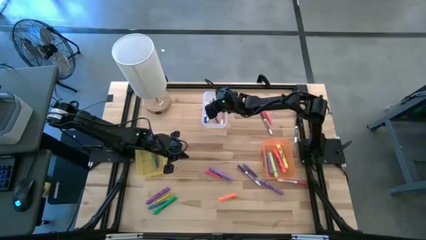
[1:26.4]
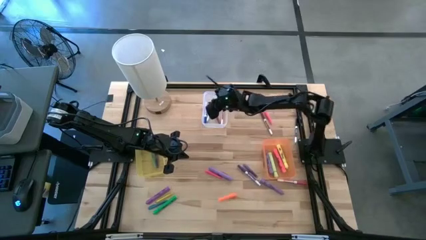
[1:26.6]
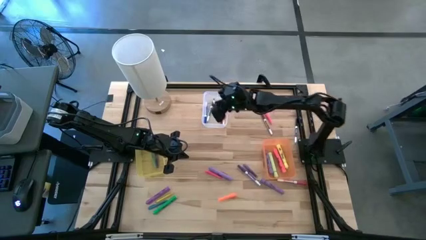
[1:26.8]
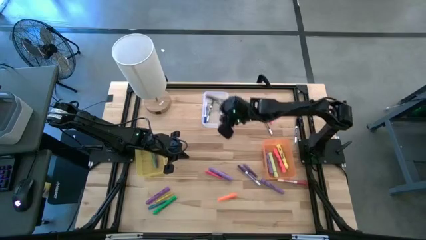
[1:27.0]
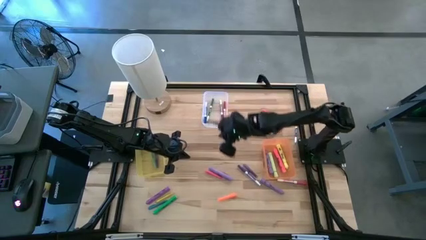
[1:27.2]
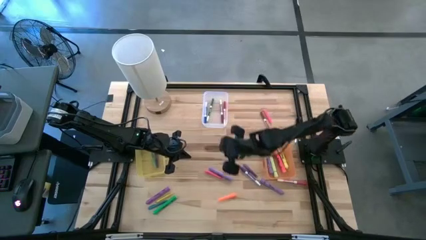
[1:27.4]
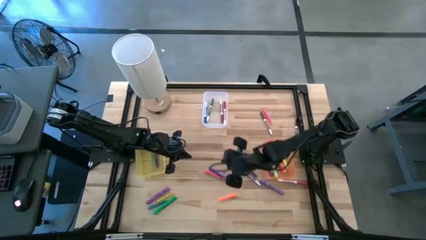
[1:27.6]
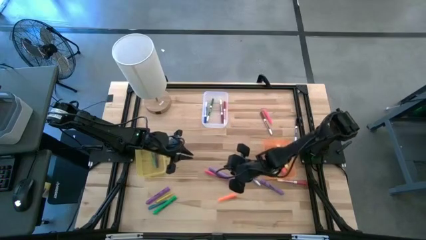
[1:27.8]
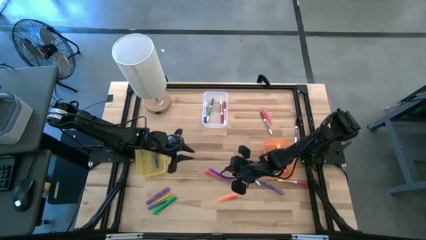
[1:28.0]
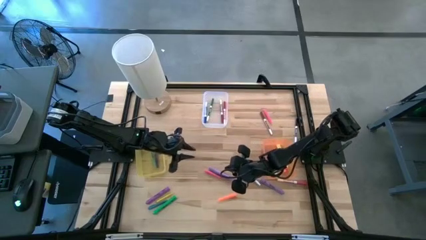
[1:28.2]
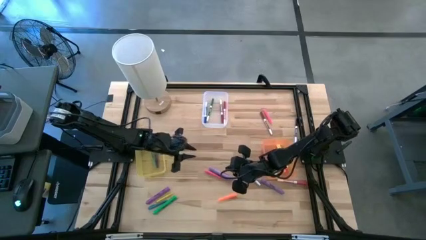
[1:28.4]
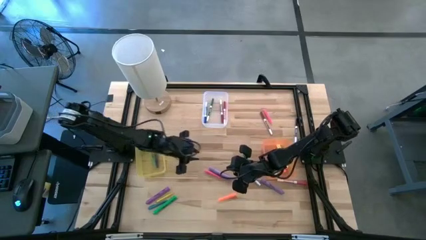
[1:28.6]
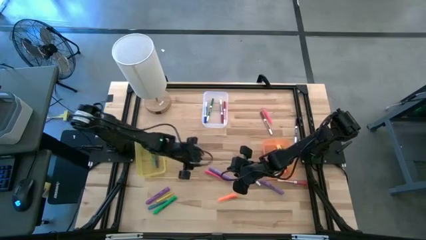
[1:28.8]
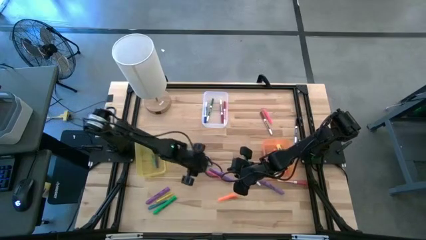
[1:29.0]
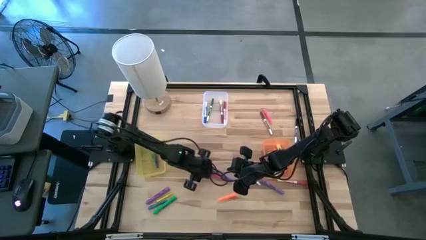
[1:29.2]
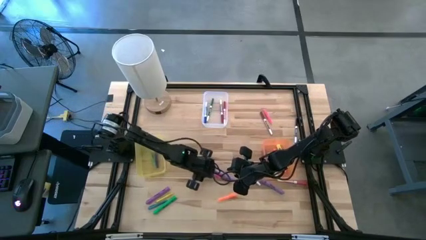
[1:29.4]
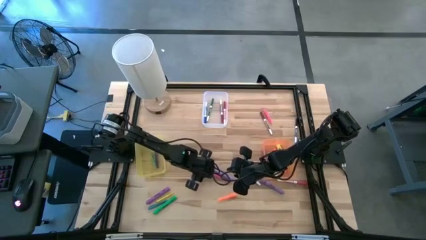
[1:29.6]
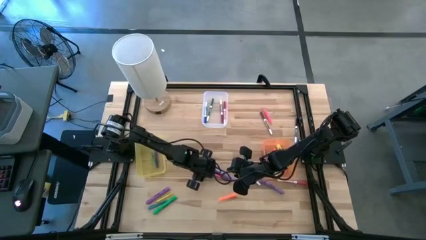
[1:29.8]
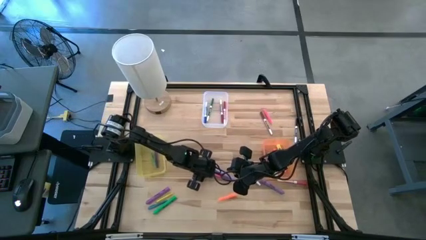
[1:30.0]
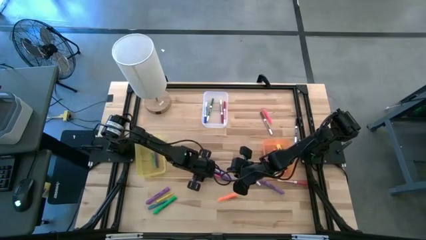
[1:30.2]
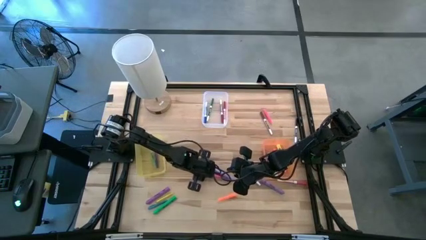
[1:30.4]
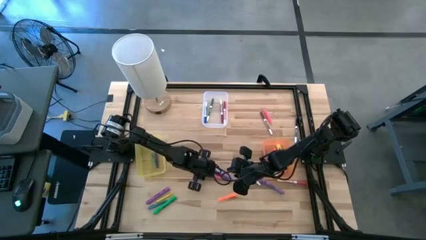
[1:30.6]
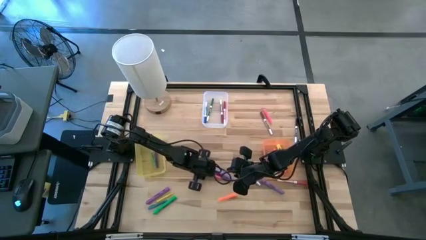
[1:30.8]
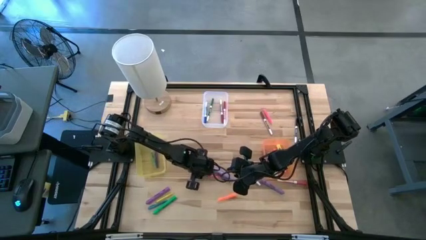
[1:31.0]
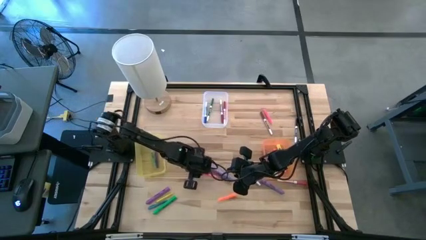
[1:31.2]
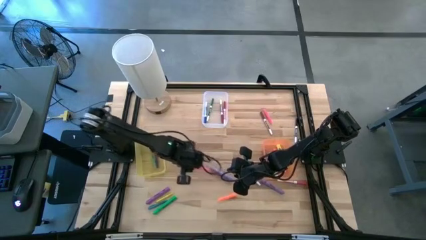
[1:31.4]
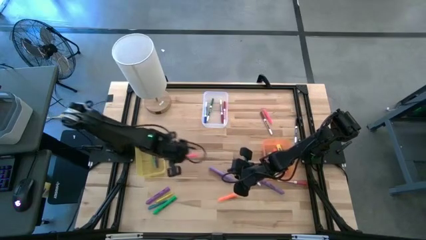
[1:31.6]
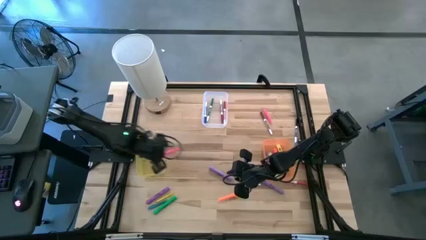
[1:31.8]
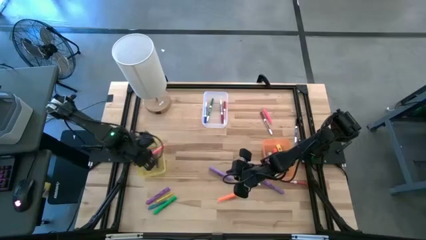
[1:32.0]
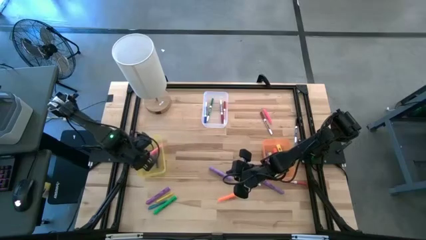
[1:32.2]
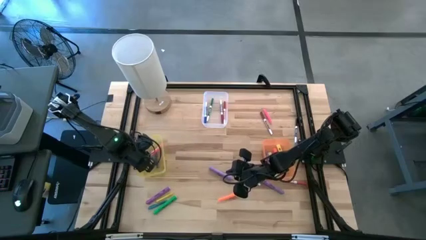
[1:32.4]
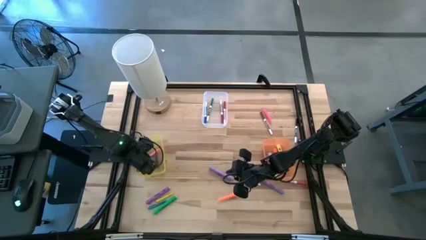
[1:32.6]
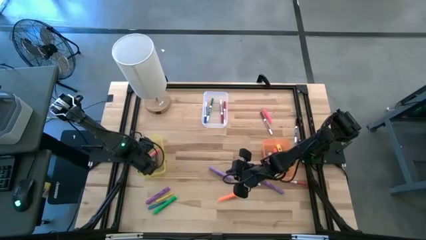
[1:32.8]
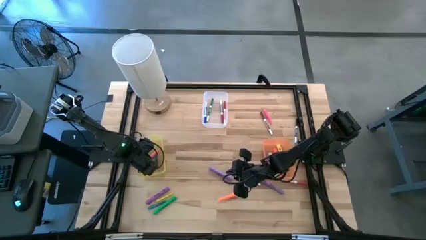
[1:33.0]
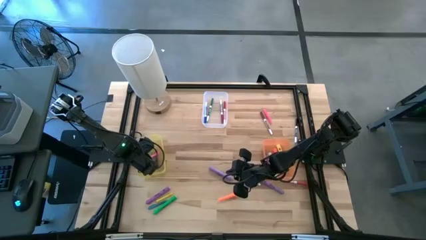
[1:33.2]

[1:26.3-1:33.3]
Task: Pick & Place Markers
Put the pink pen into the yellow bin

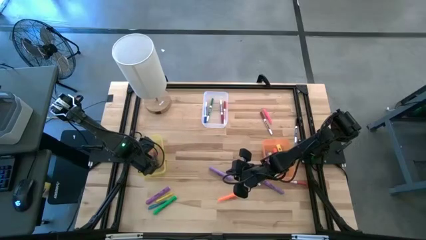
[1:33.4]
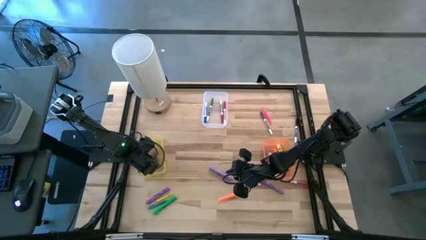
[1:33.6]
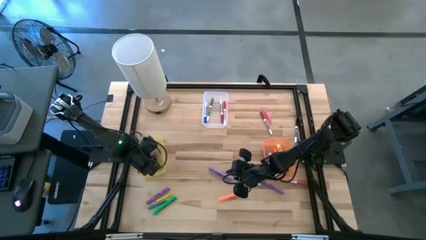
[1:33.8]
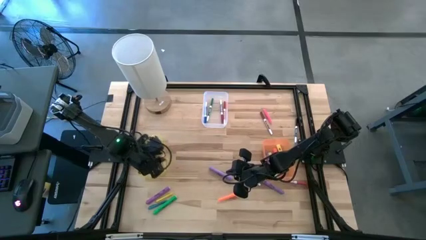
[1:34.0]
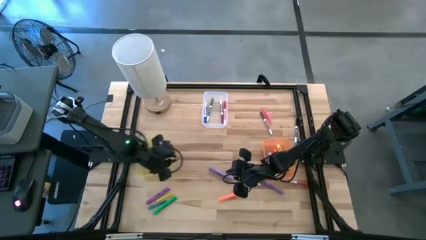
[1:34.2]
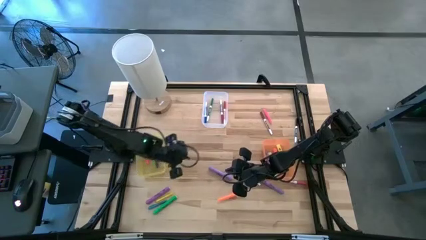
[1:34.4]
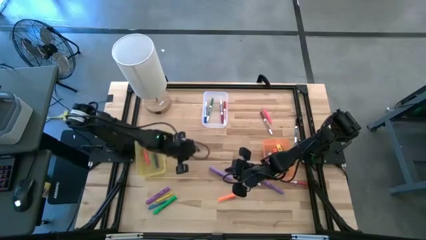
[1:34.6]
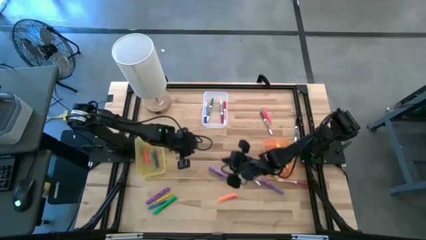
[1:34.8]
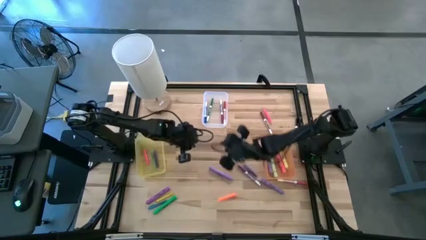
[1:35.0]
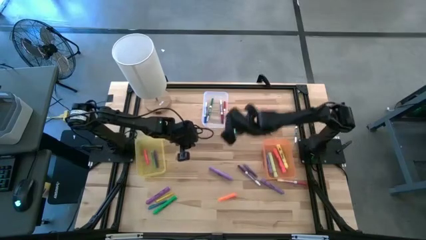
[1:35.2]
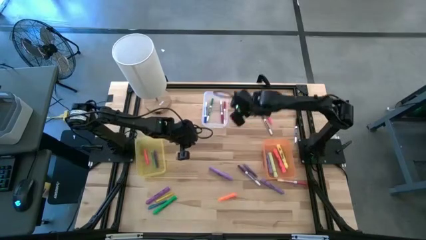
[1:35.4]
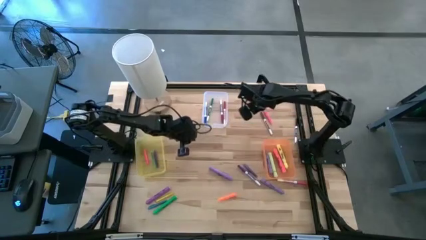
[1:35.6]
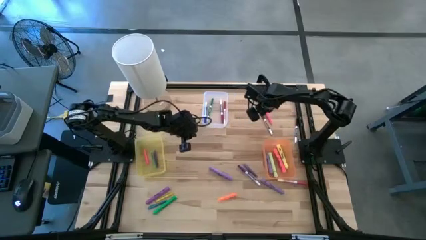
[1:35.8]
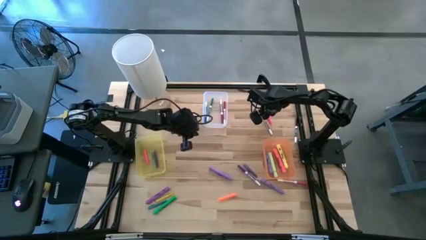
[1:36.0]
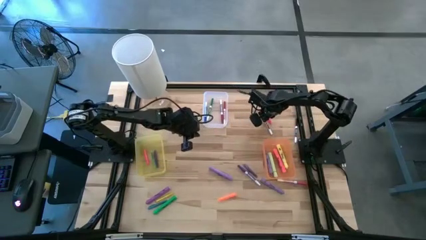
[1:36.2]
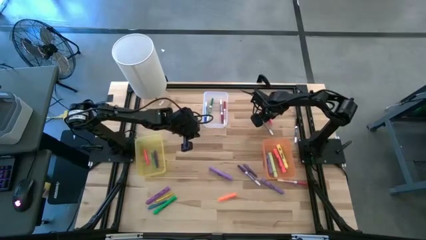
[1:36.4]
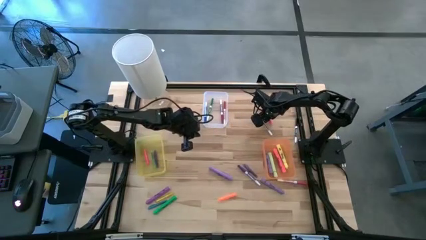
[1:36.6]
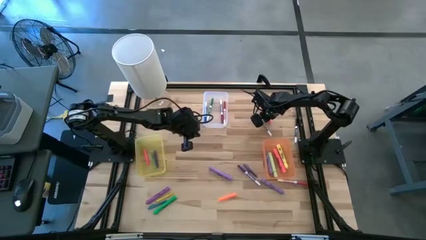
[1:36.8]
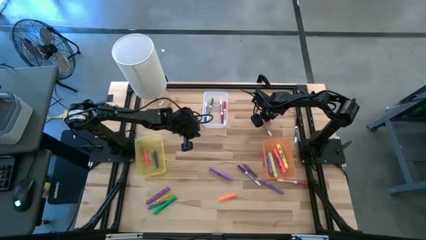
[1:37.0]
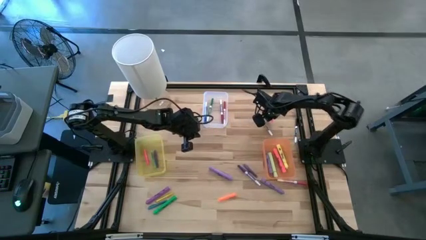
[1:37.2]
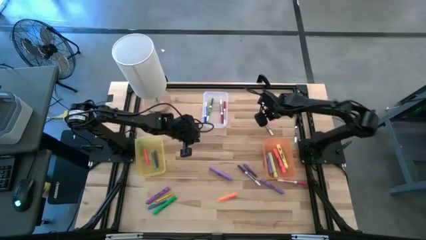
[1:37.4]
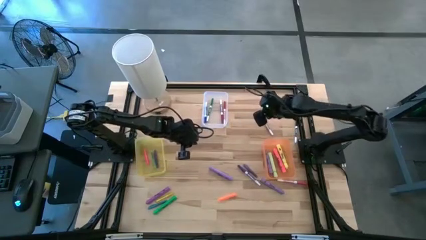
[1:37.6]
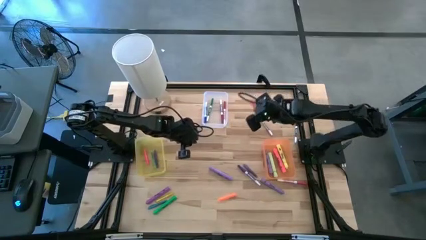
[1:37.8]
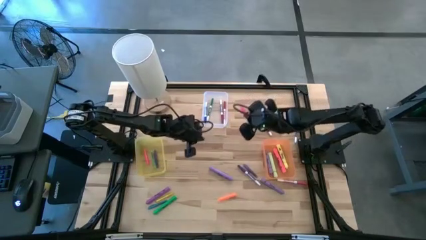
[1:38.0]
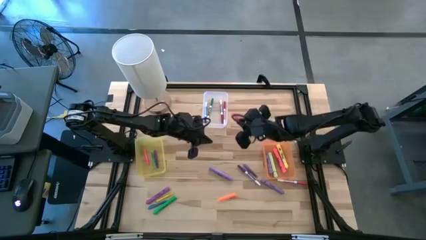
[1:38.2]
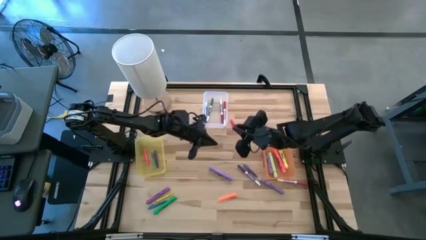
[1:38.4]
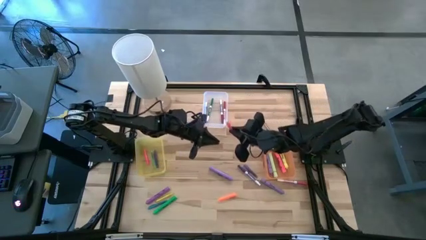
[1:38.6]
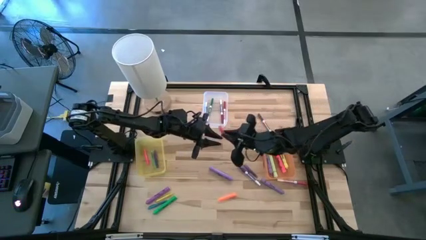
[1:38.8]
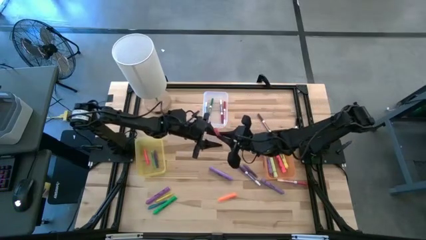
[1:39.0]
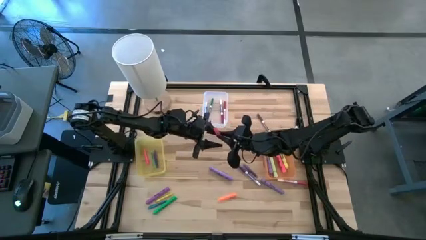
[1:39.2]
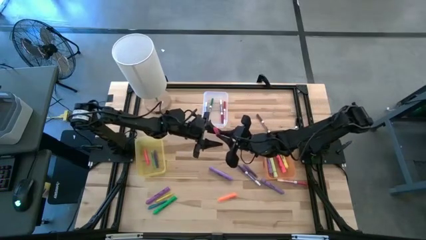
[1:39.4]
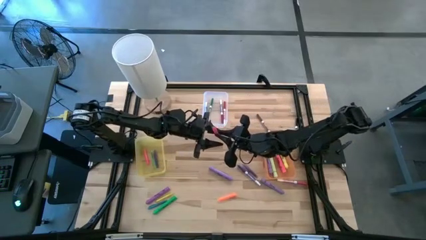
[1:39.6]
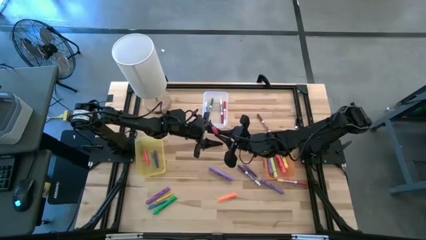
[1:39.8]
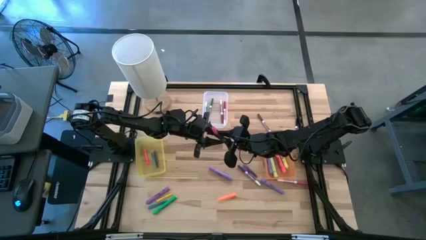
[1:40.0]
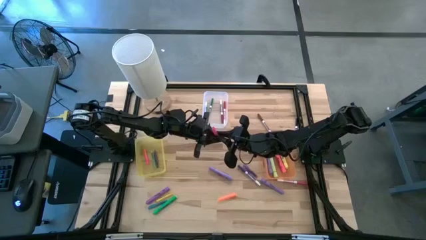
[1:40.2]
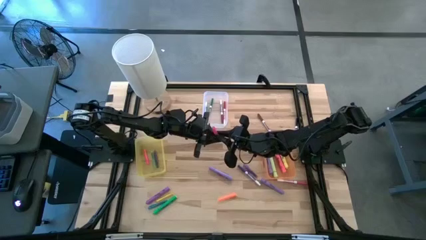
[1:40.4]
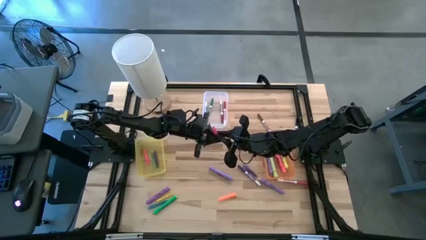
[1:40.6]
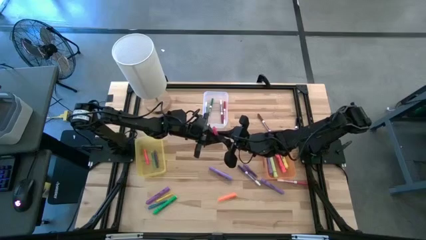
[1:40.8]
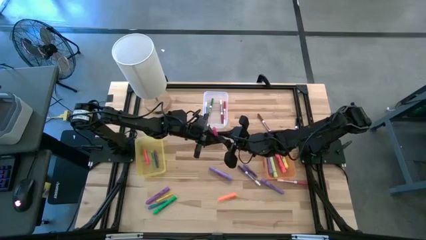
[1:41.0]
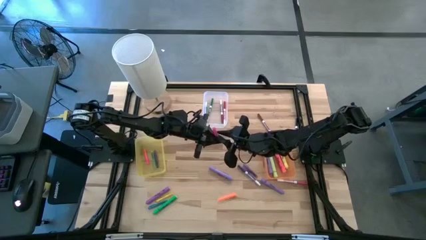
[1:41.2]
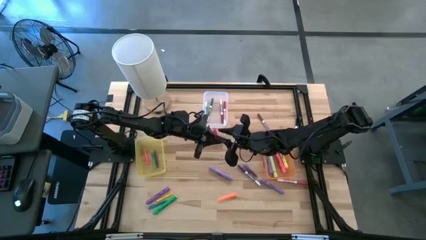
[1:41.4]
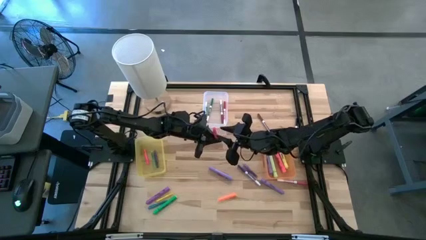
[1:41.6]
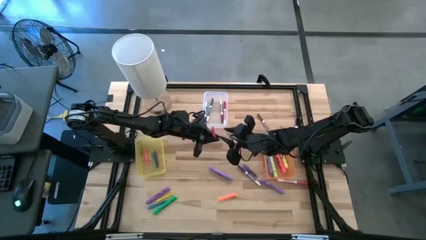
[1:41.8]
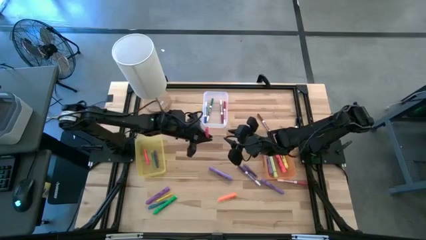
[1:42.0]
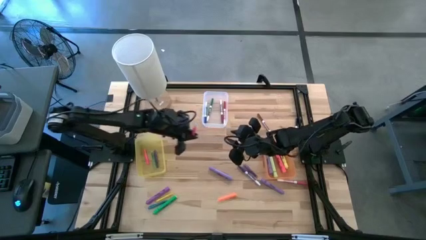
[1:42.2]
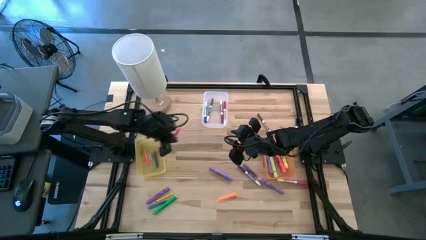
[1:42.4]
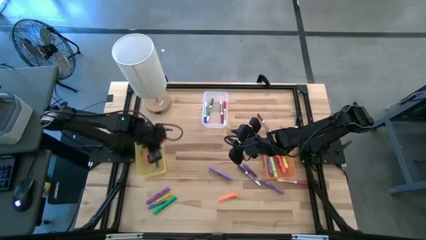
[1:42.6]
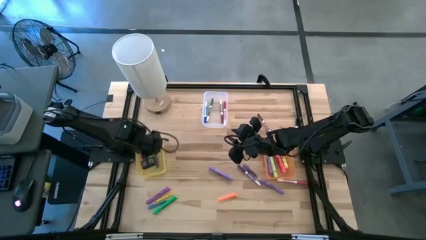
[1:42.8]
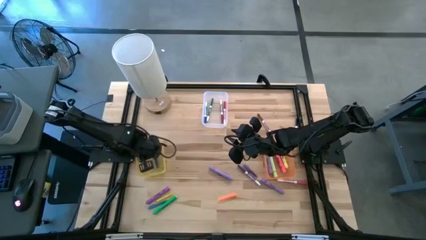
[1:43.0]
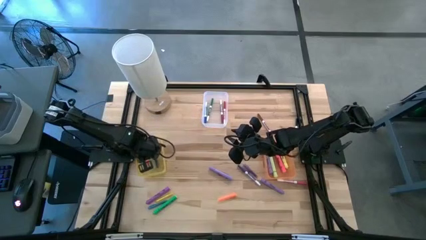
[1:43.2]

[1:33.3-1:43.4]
Put the pink pen into the yellow bin
